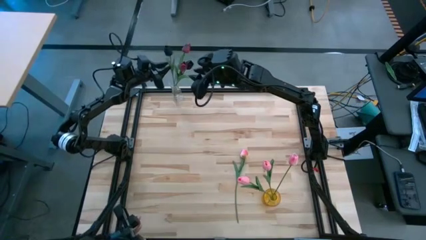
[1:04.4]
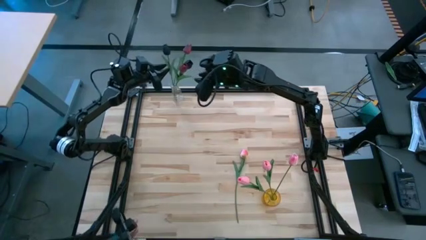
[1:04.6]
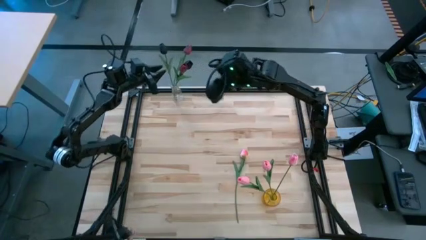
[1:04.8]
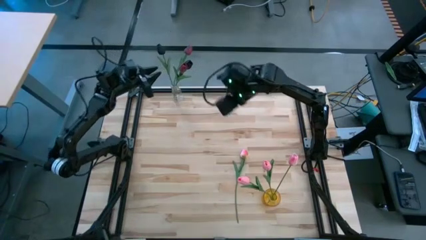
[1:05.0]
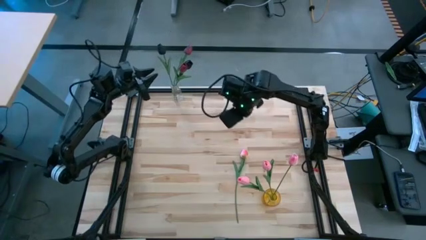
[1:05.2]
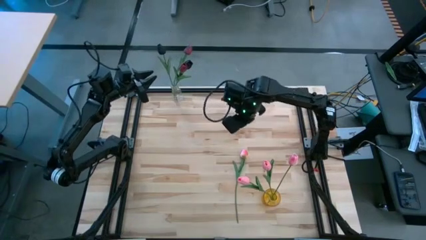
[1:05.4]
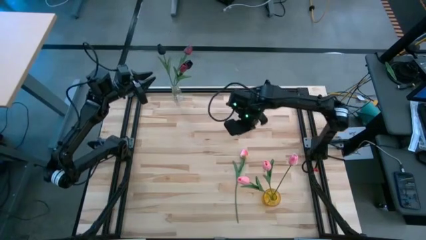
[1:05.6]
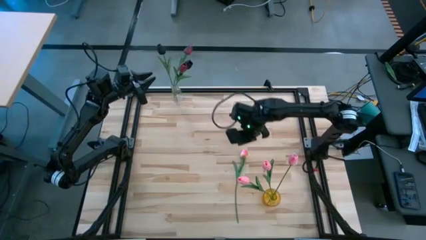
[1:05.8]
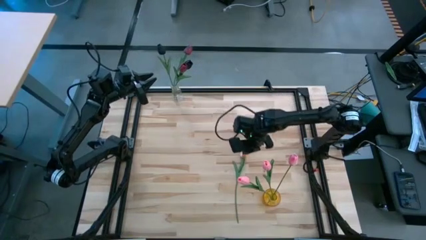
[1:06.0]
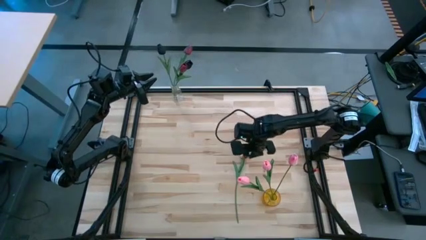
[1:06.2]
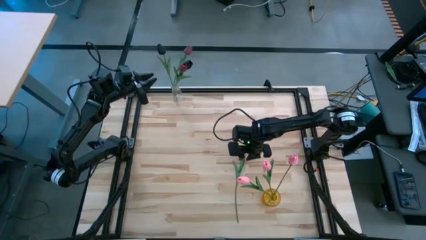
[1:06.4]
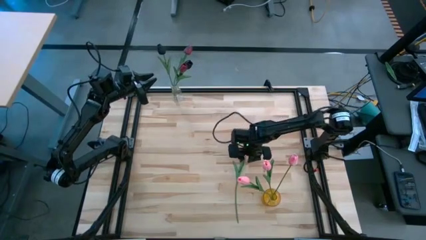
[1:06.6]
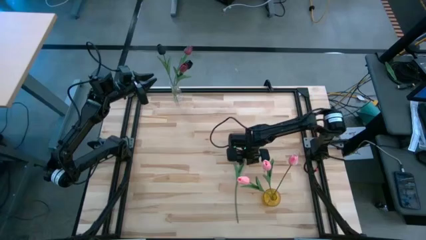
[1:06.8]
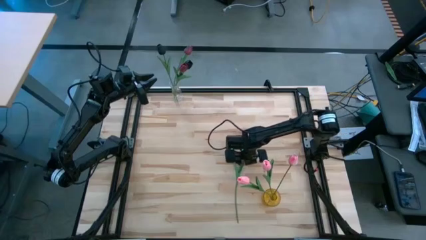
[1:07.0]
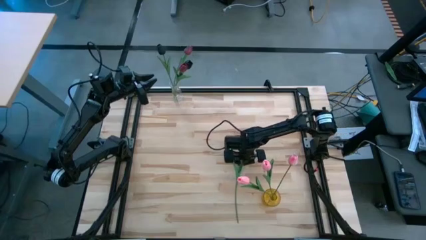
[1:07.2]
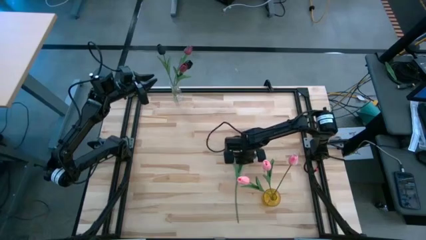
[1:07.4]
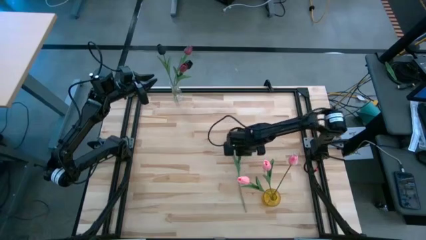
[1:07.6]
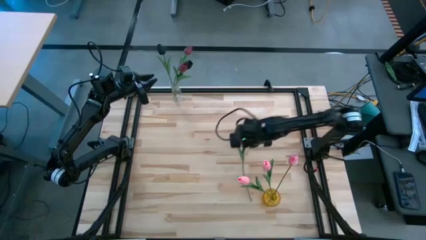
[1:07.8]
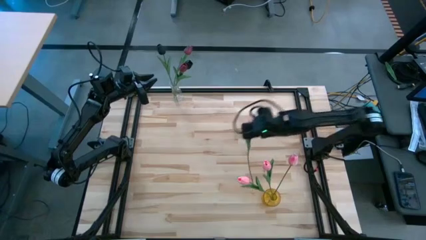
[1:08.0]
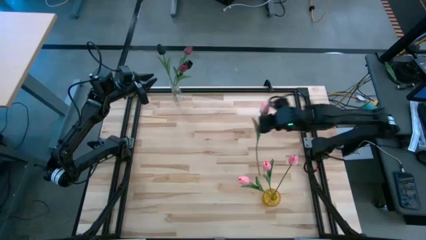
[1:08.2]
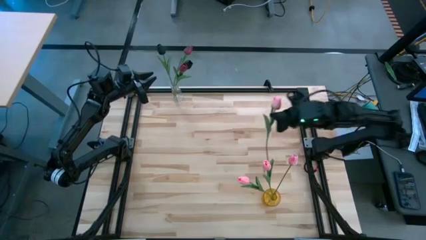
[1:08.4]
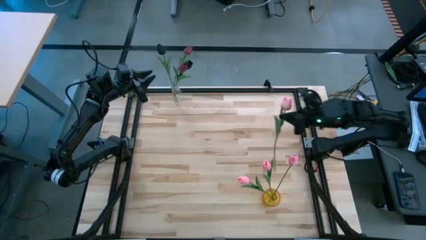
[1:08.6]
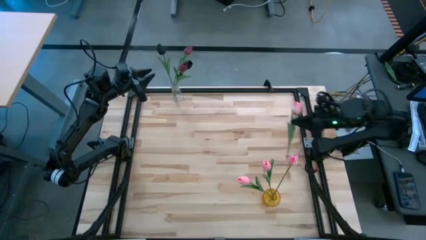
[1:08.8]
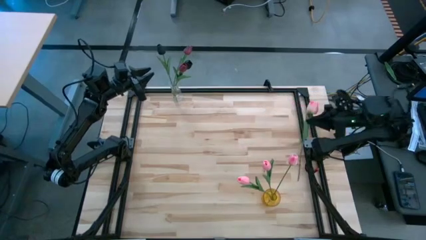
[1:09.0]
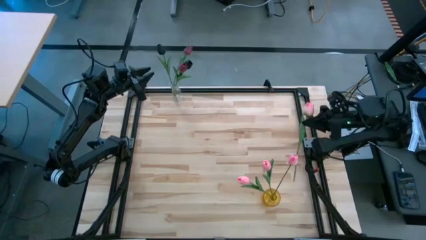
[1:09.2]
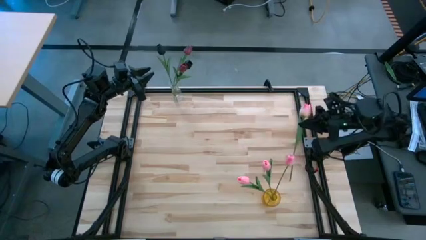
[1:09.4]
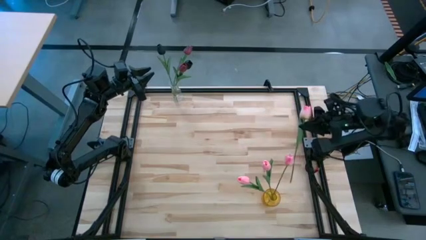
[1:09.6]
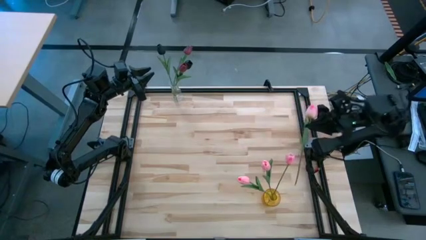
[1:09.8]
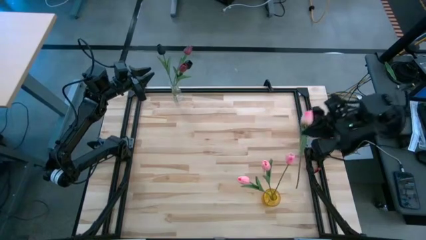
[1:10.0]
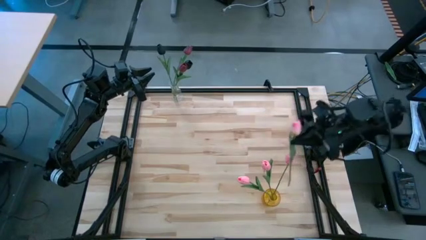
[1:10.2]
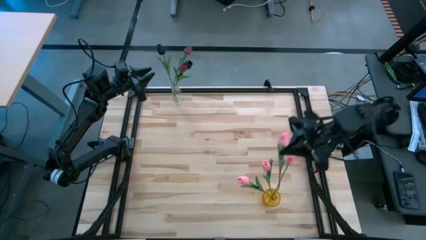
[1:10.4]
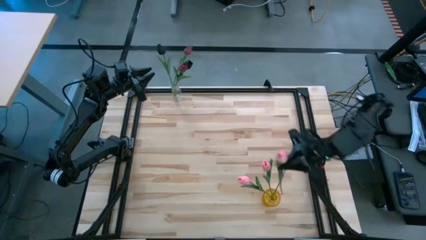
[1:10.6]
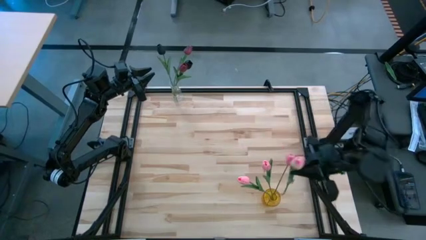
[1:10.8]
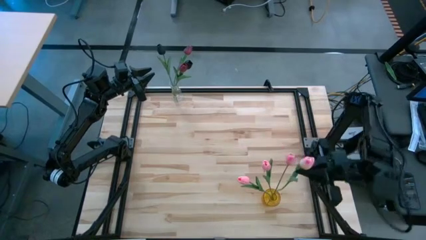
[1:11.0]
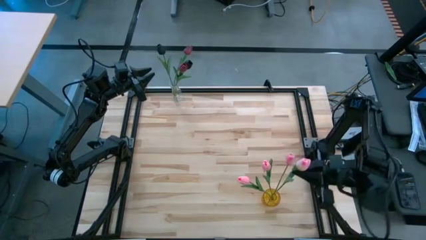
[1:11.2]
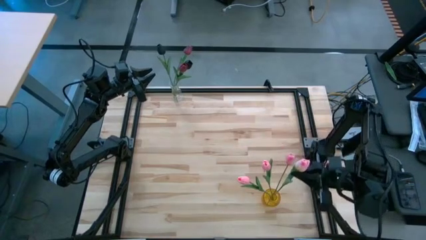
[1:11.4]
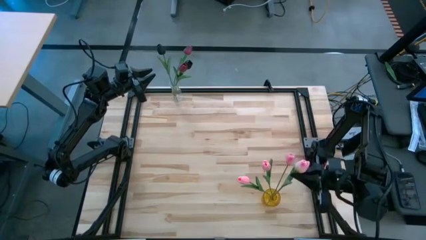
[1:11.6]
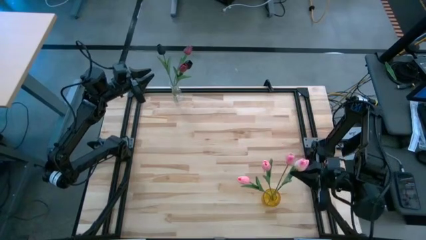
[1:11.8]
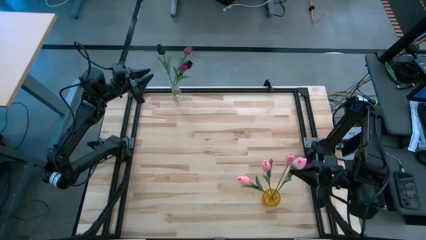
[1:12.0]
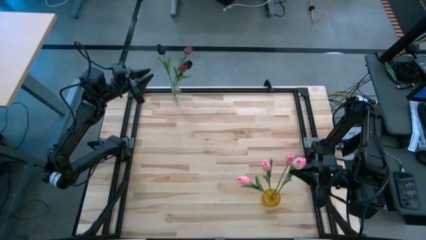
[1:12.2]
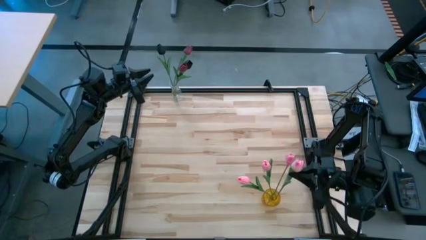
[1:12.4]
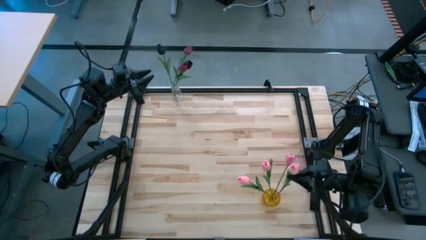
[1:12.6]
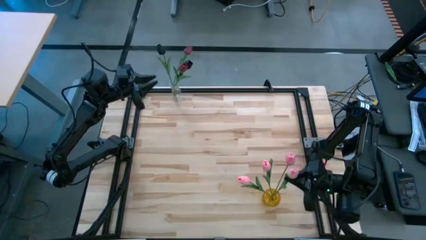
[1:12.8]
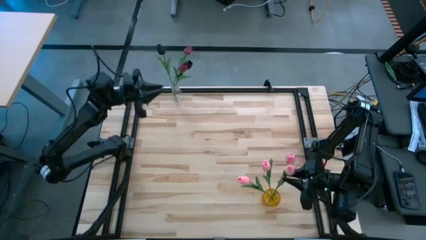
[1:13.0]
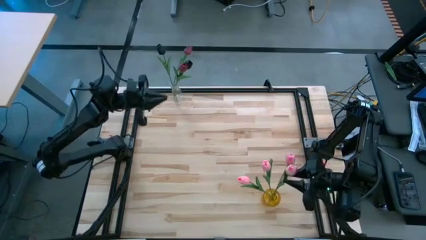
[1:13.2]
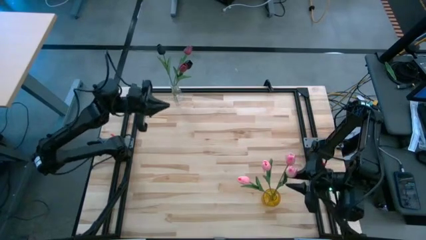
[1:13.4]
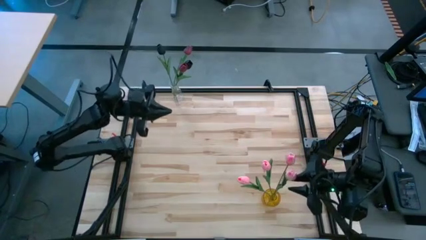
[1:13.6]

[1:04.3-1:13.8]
Task: Sort flowers into vase by color
Put the yellow-pink flower into the yellow flower vase

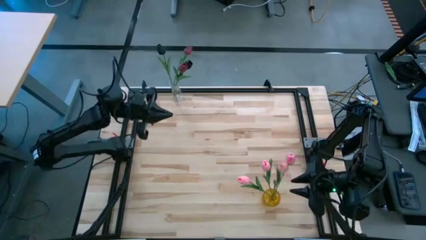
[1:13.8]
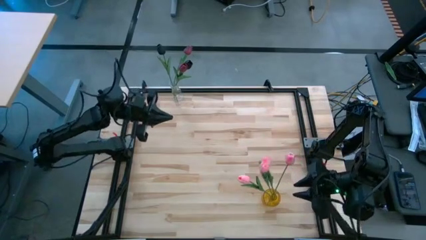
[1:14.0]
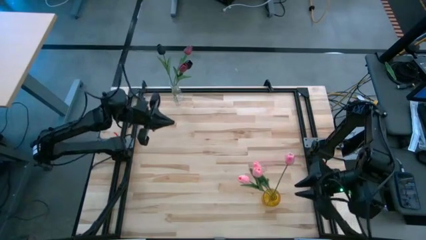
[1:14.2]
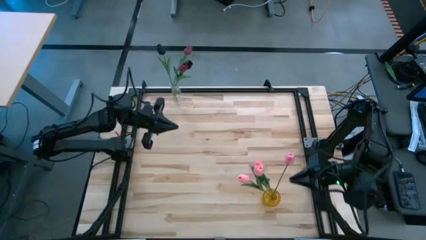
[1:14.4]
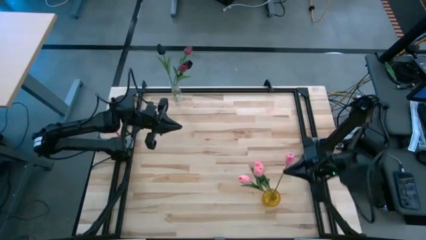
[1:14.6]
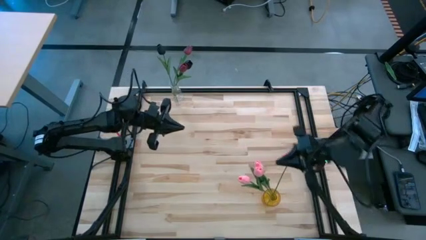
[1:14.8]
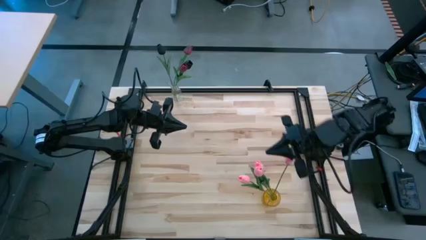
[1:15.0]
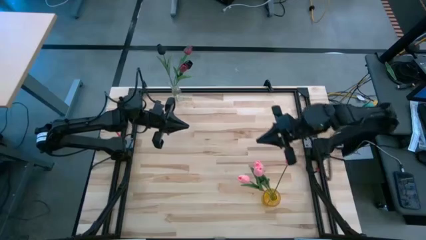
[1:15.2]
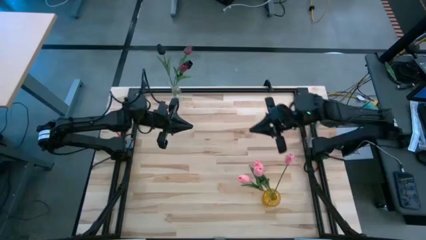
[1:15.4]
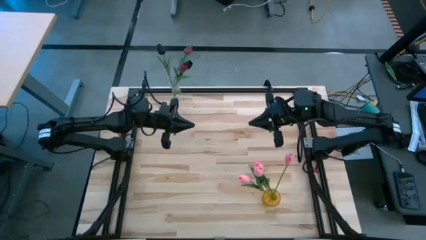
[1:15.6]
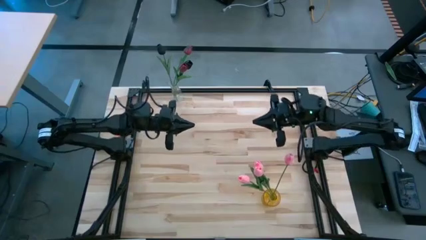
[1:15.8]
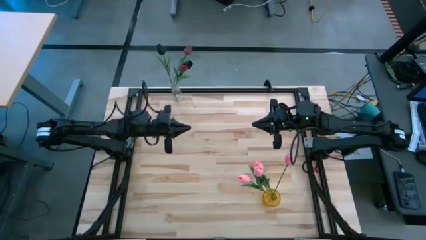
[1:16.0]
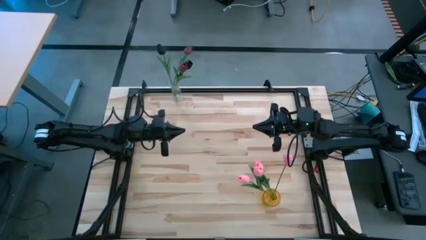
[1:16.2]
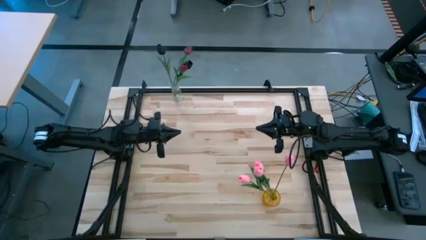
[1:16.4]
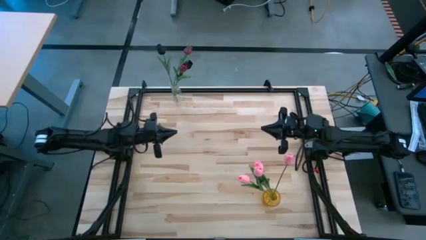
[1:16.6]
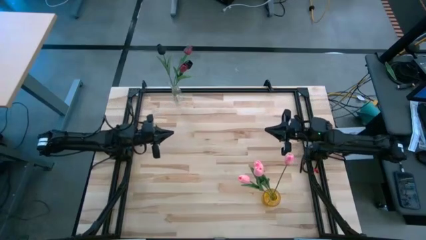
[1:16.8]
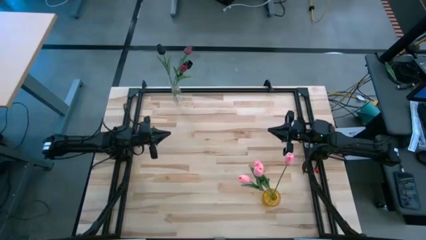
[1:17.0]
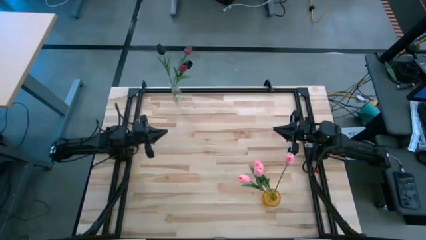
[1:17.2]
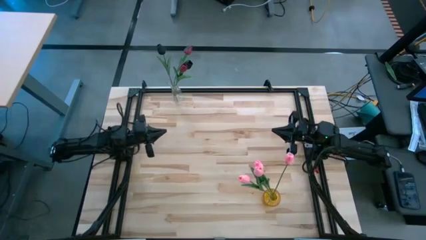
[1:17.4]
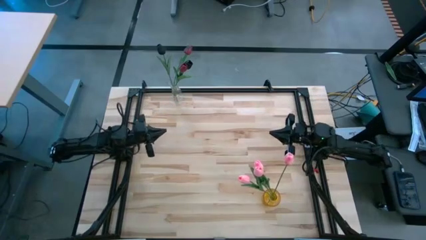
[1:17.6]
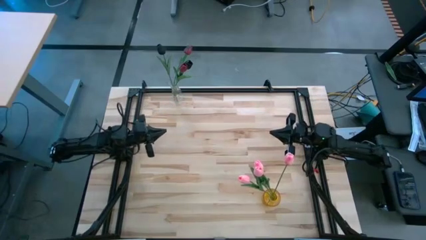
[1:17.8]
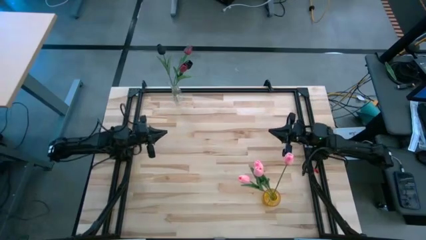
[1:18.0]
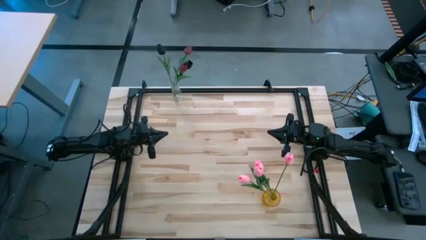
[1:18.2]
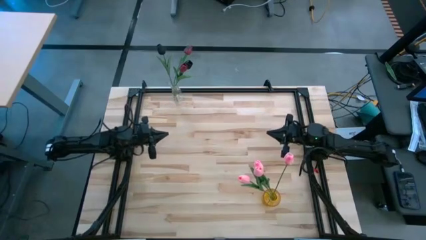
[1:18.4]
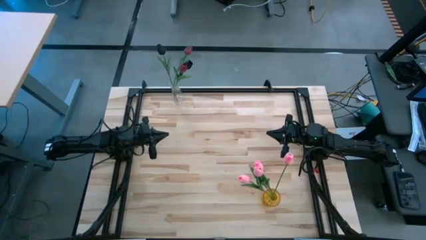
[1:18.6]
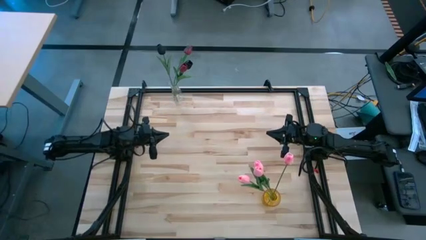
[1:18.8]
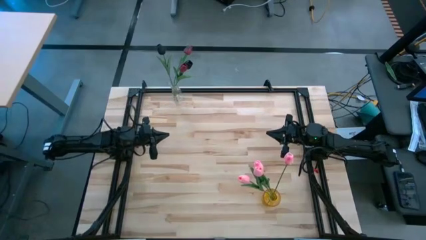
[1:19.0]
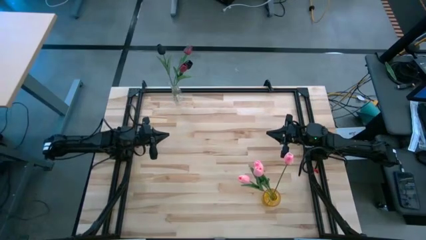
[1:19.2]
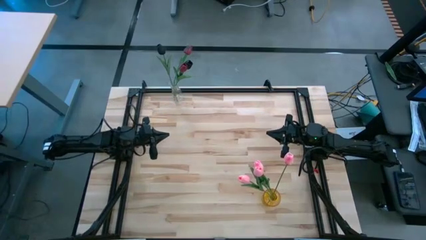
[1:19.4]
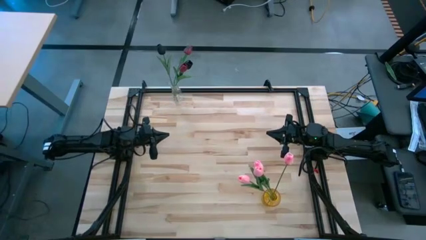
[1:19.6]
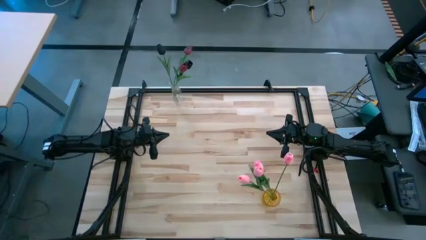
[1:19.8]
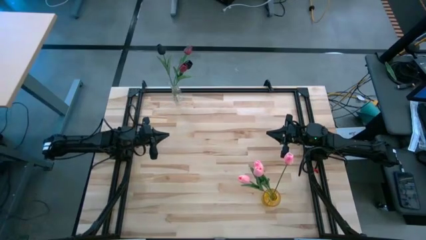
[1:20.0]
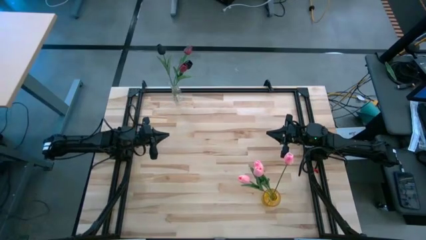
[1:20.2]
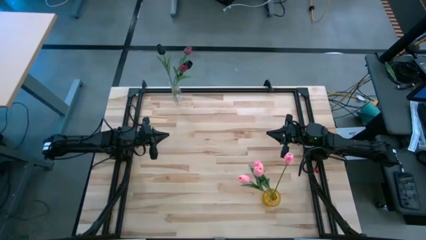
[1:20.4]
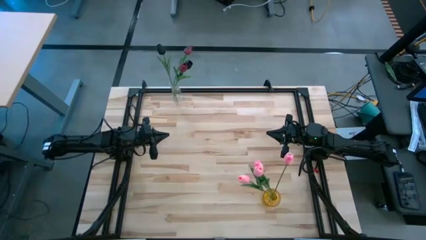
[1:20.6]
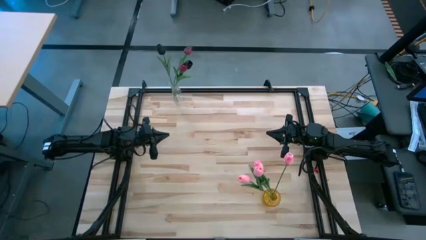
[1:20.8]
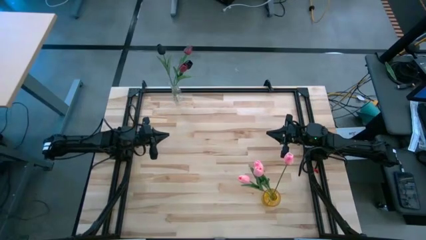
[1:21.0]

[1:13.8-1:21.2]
Return to Home Position
